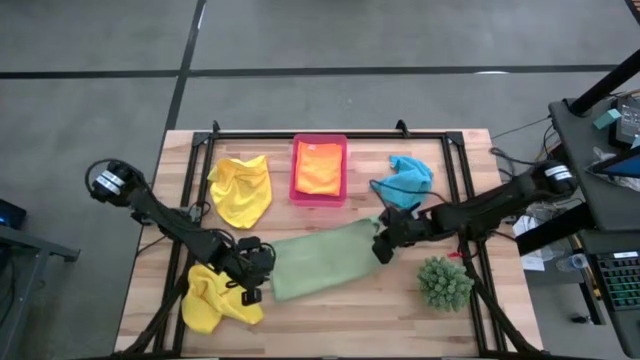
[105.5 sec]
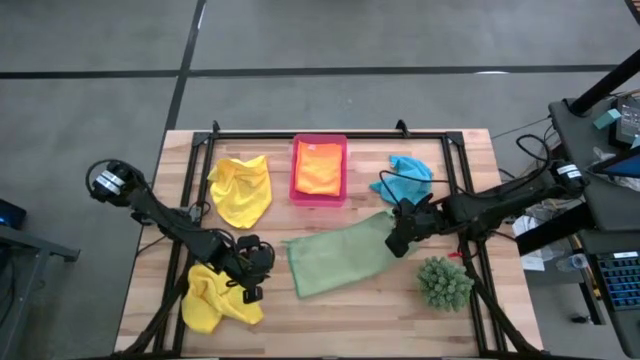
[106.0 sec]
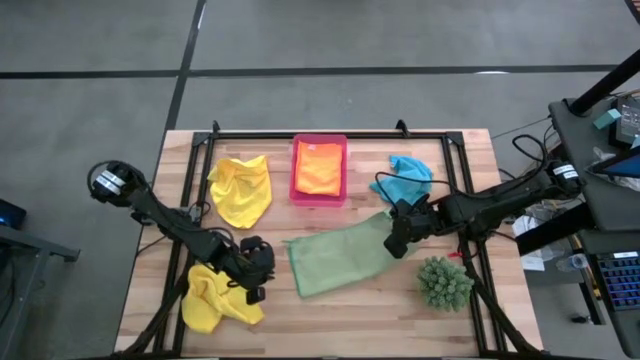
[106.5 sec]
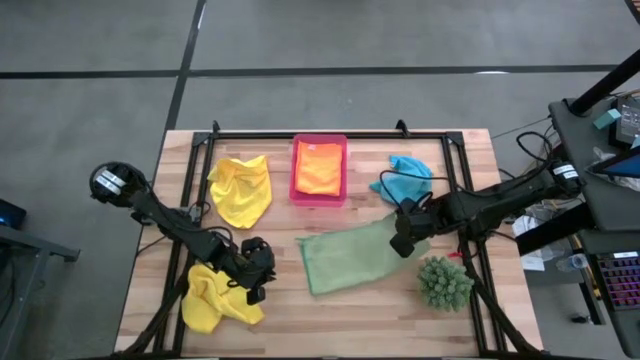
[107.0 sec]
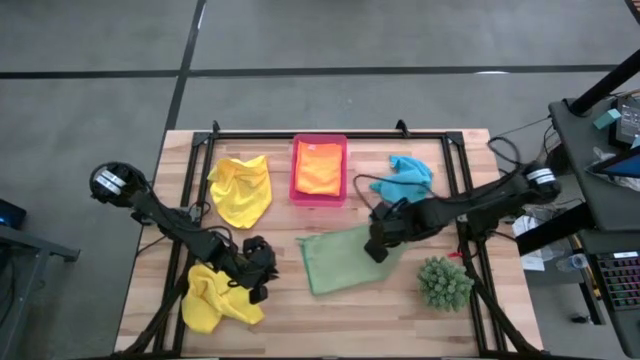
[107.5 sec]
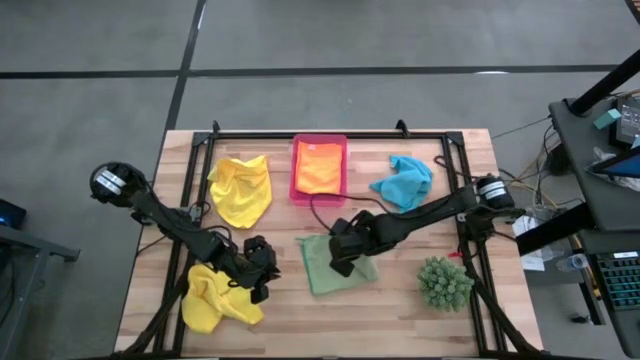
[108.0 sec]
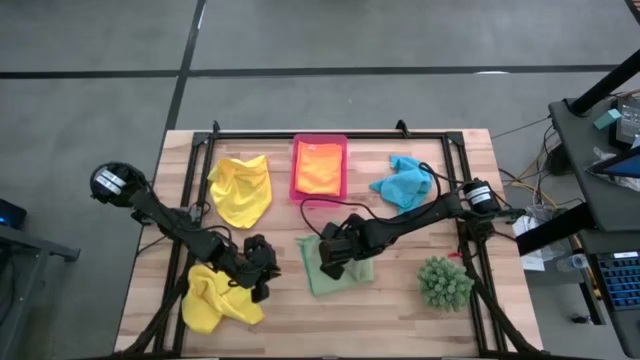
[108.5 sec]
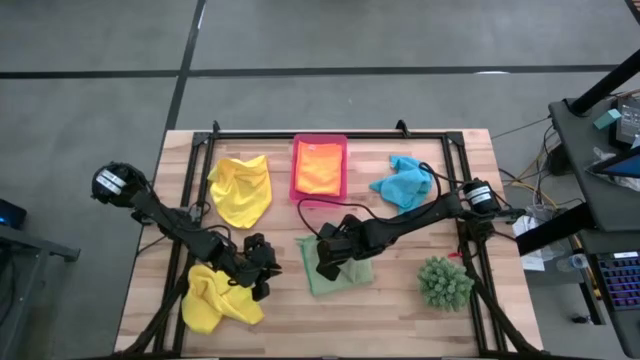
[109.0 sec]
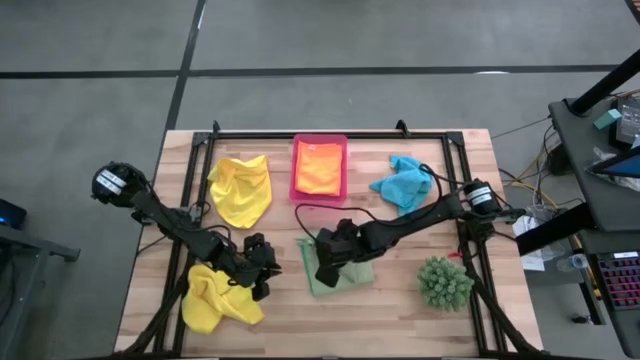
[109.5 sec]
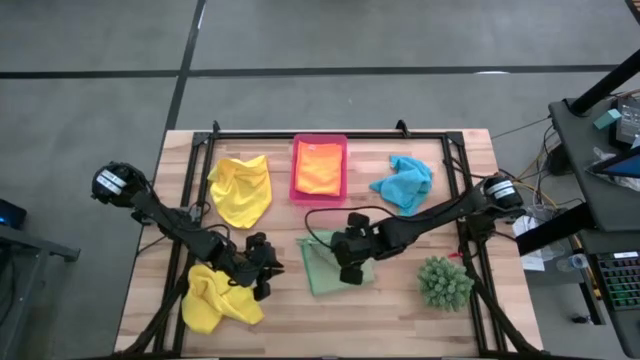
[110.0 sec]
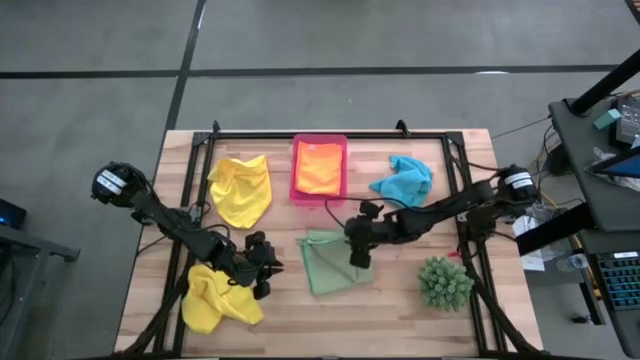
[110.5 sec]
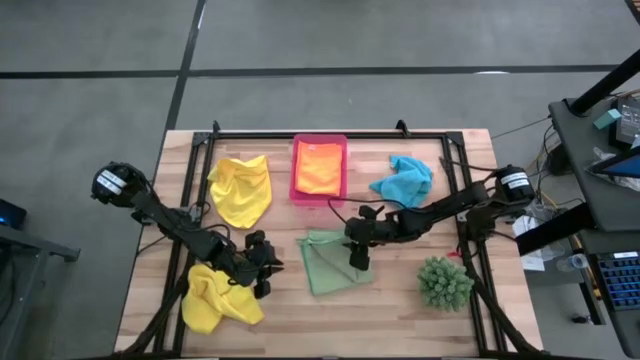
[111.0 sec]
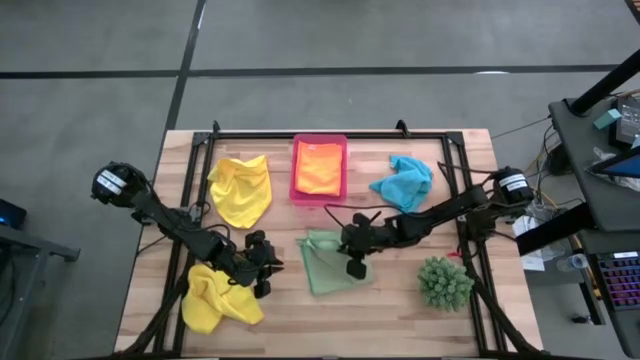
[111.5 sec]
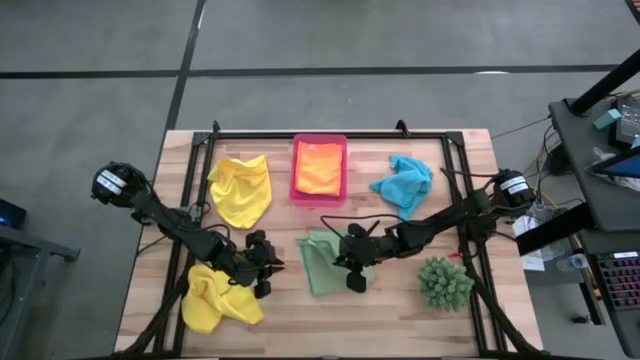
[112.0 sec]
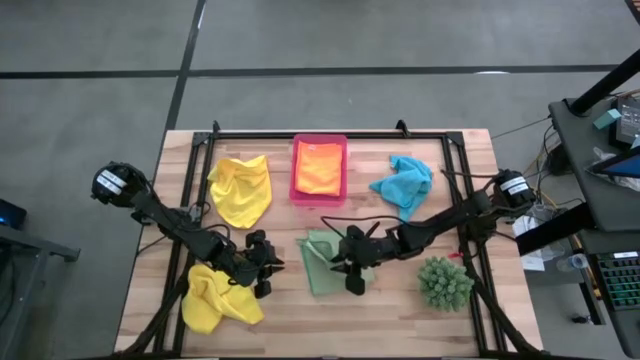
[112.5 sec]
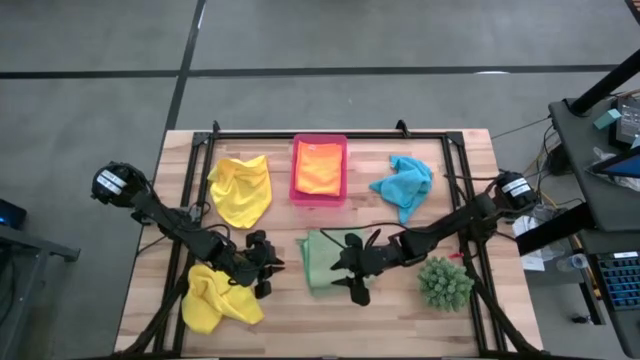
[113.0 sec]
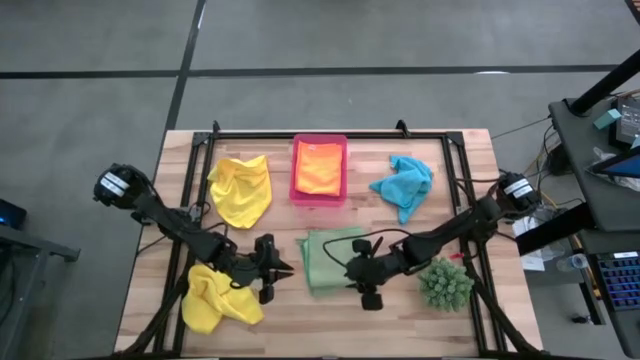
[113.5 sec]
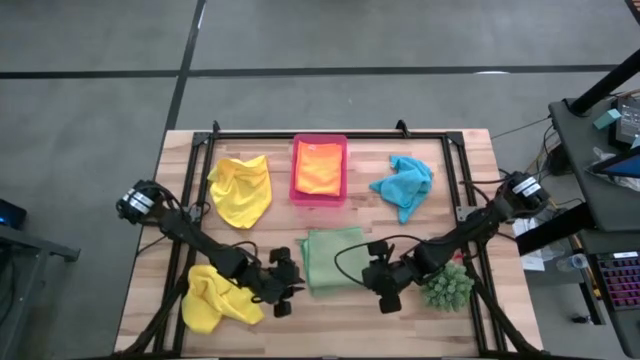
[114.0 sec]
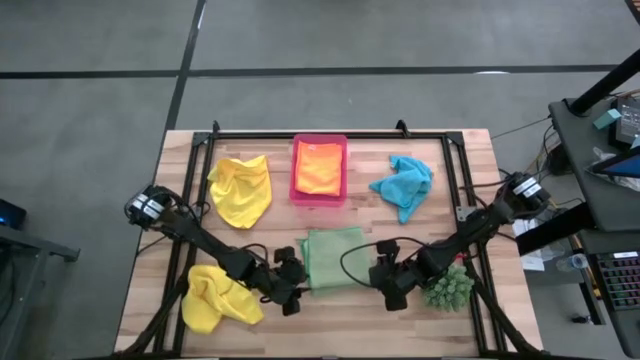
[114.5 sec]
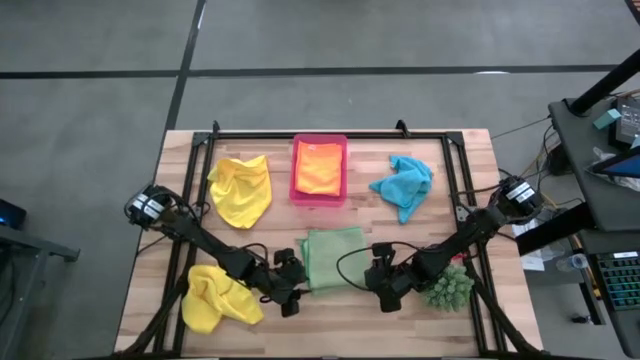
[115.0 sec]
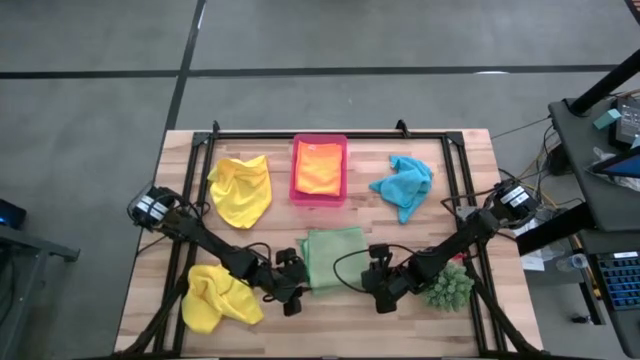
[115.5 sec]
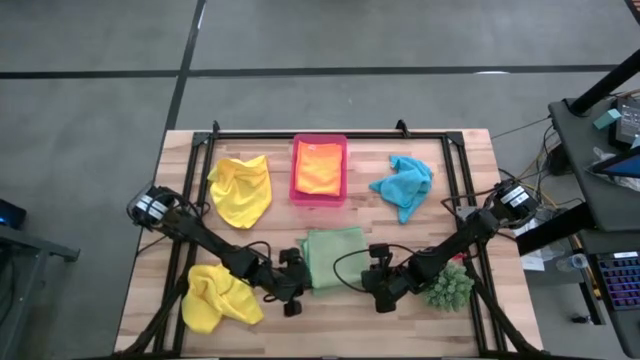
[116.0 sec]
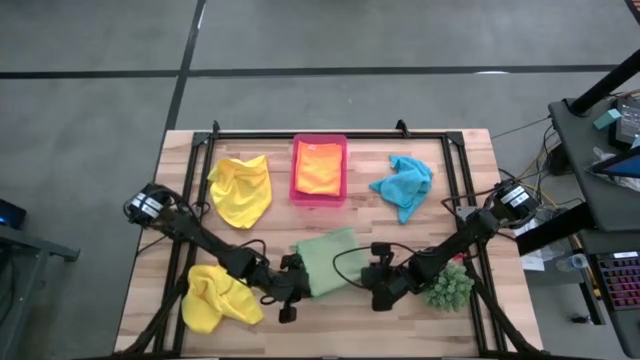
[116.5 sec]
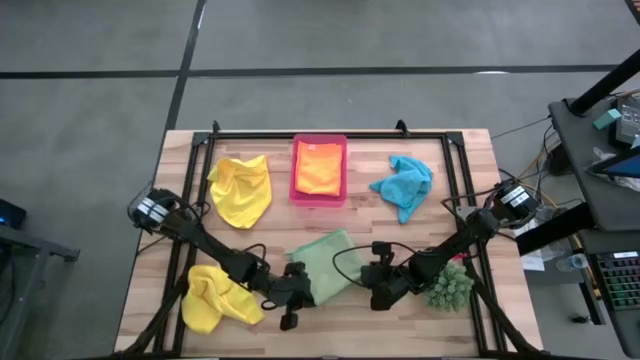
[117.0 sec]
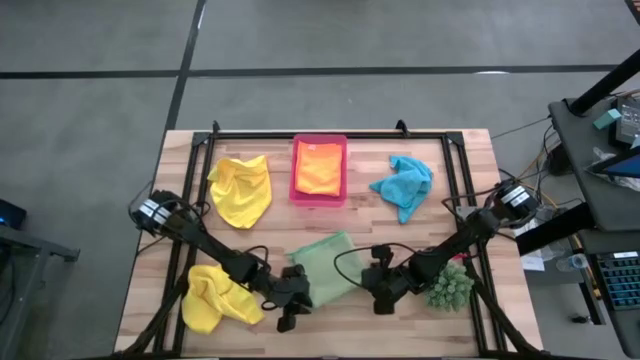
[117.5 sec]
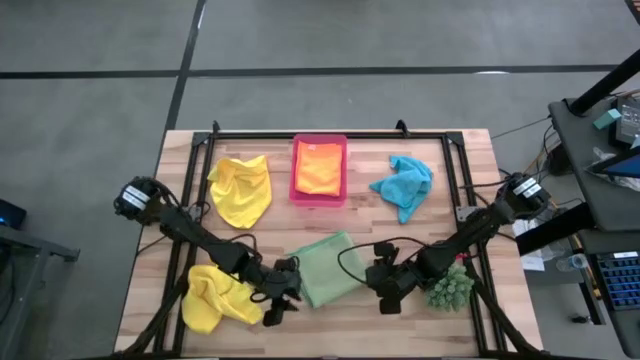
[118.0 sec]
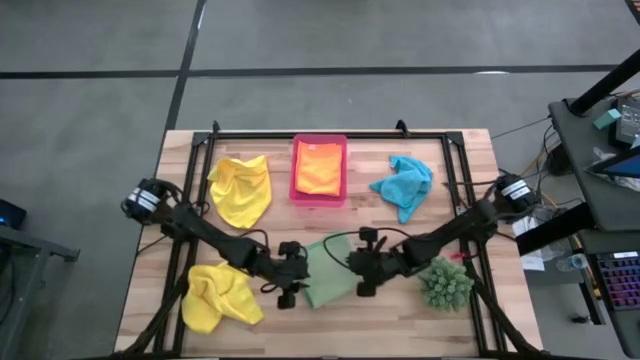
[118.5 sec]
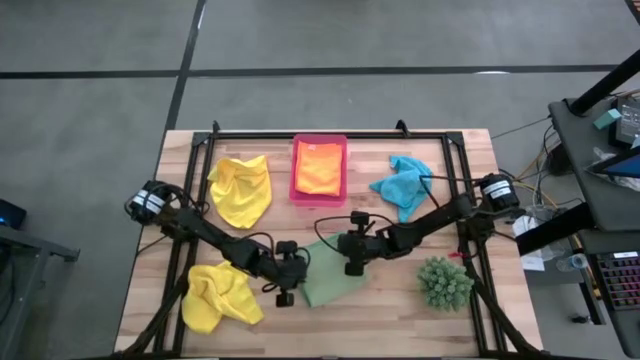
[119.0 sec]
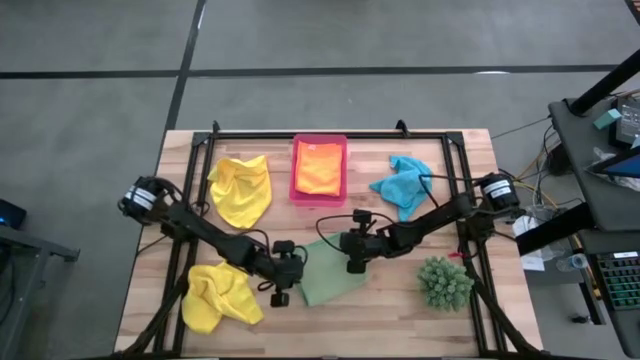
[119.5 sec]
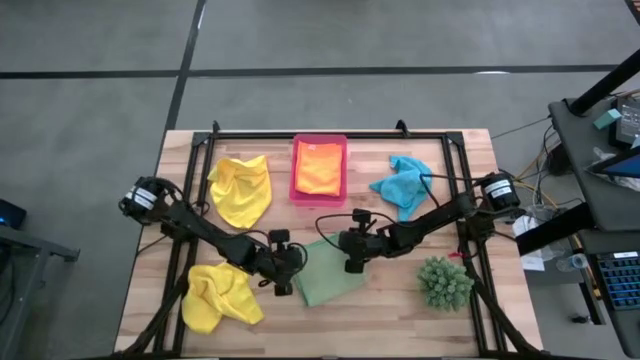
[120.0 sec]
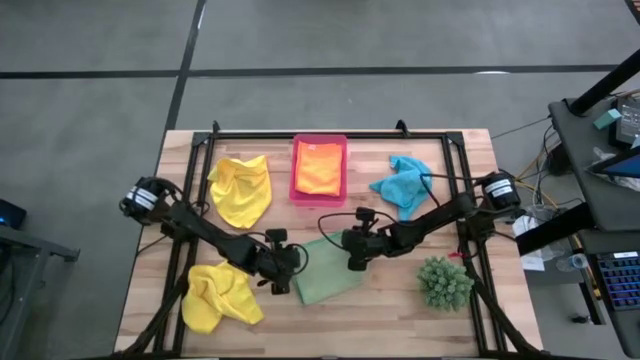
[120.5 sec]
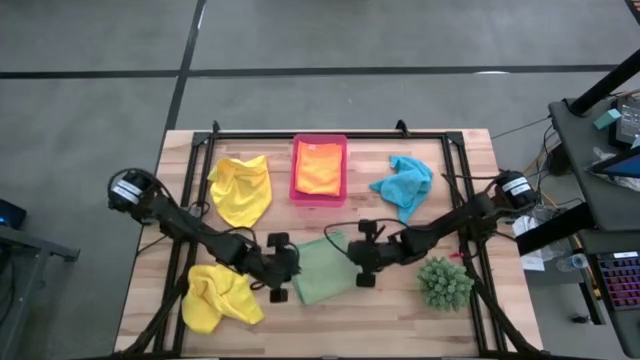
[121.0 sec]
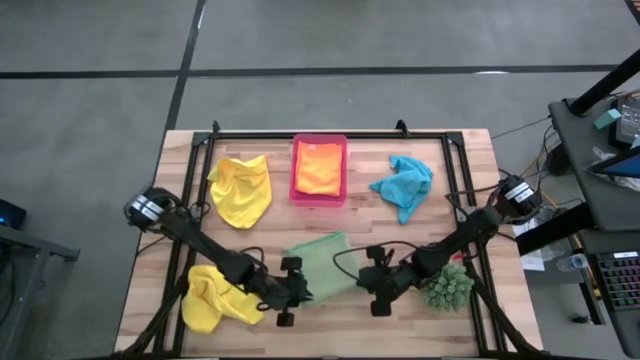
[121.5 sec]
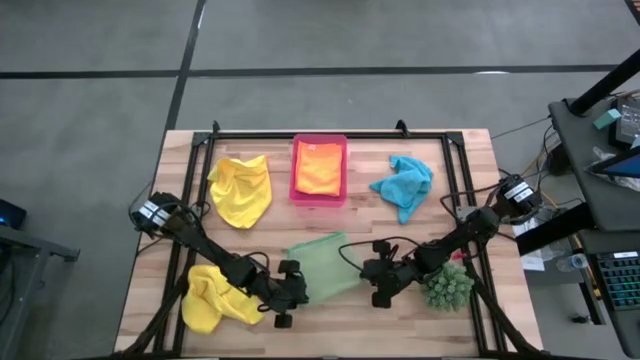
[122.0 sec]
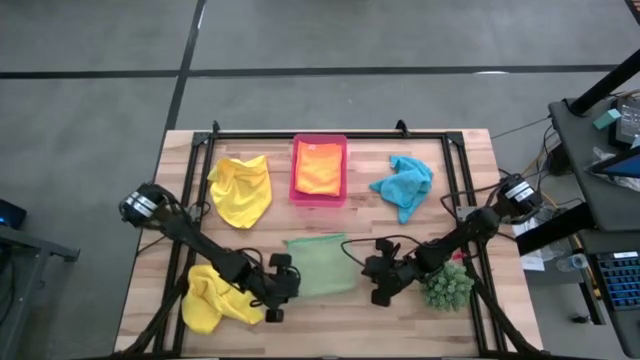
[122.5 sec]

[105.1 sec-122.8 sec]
Task: Fold microfiber towels
Fold the green towel
